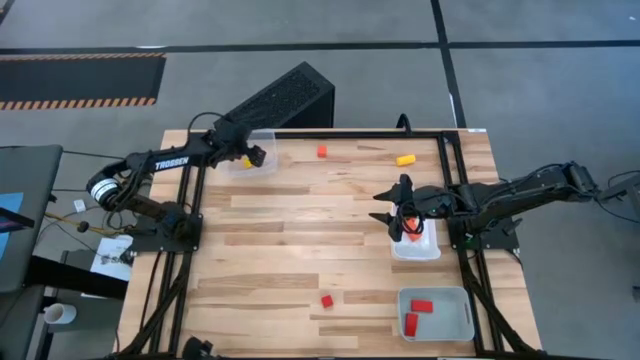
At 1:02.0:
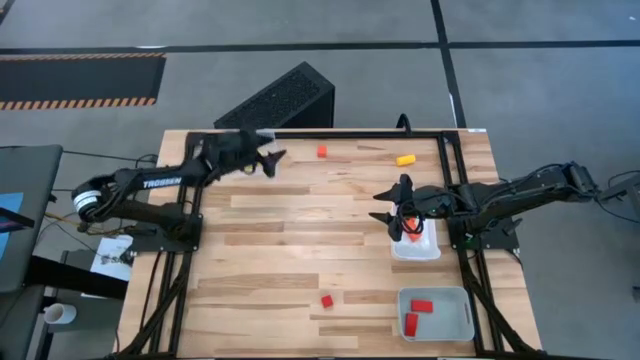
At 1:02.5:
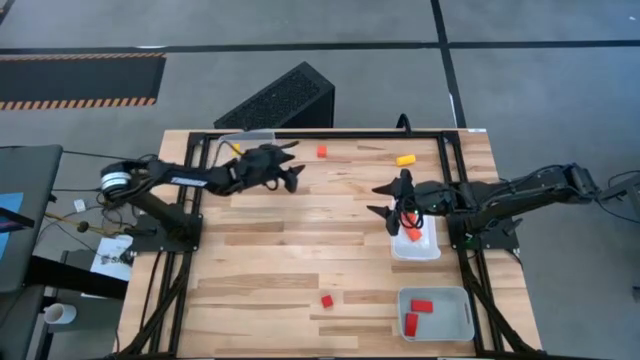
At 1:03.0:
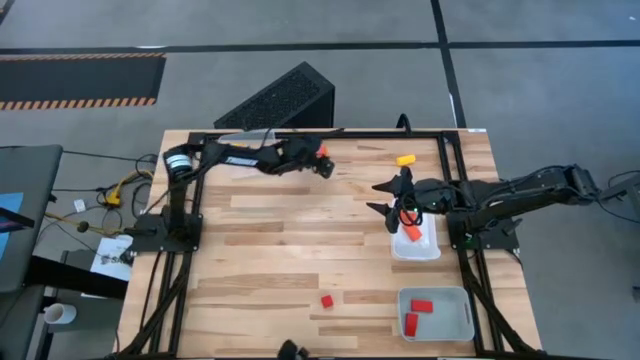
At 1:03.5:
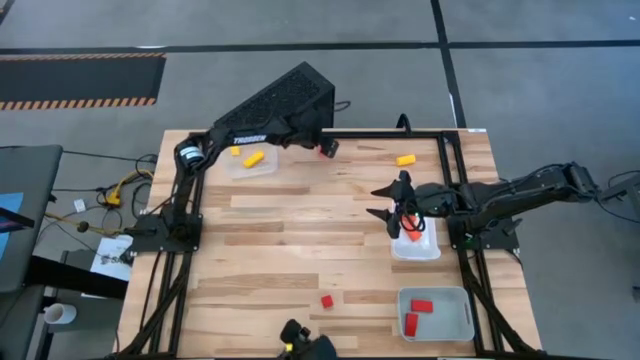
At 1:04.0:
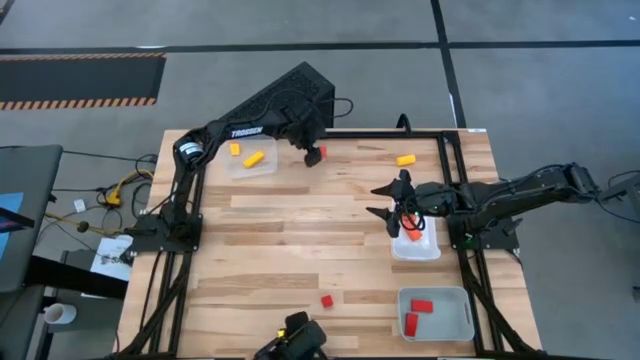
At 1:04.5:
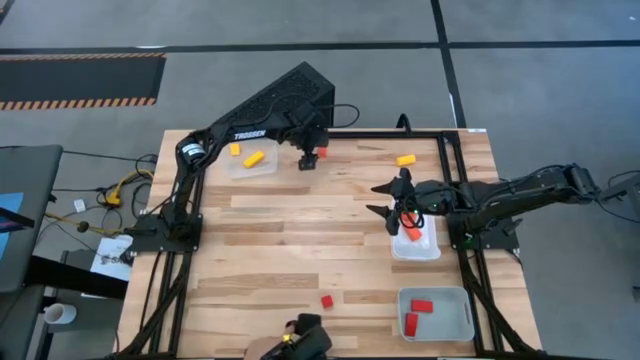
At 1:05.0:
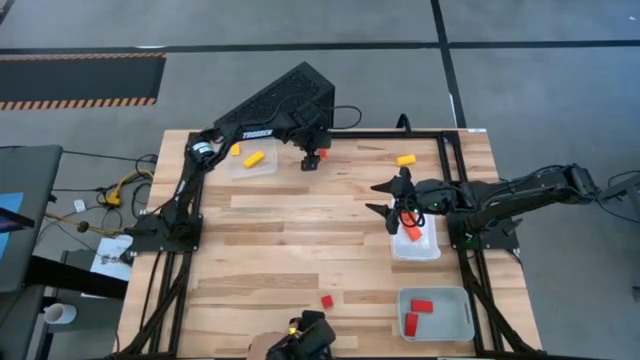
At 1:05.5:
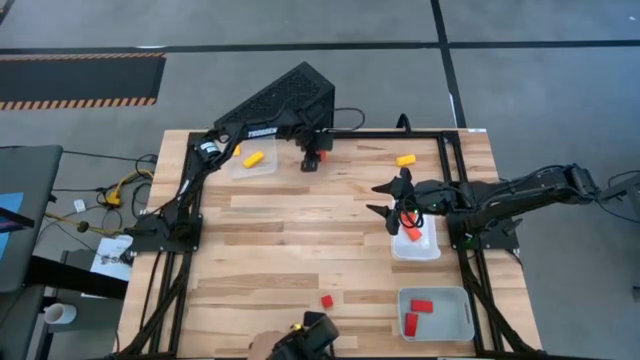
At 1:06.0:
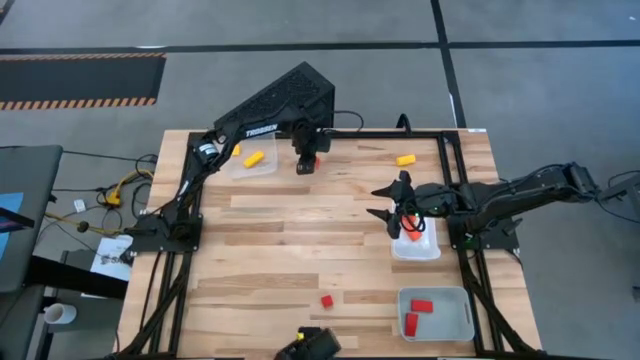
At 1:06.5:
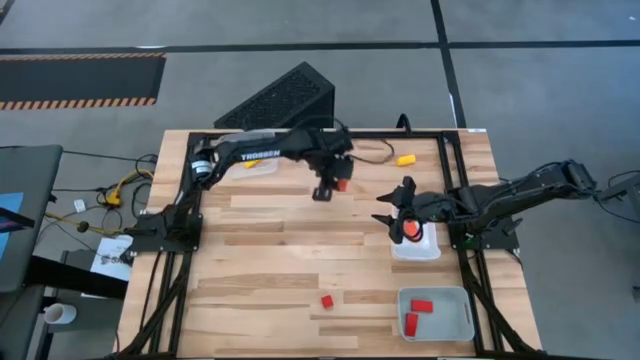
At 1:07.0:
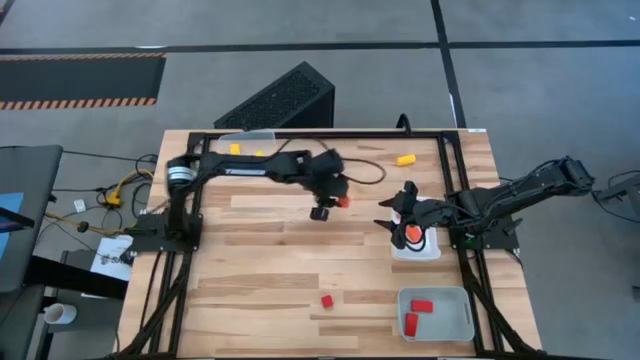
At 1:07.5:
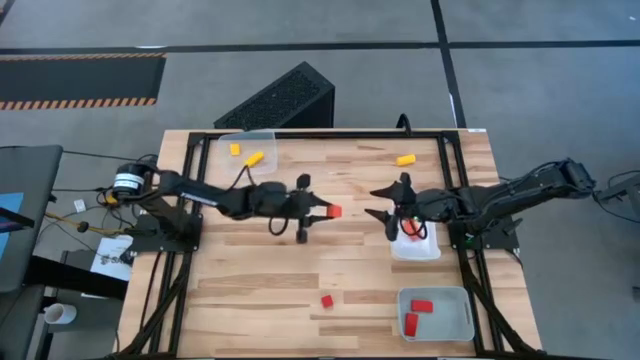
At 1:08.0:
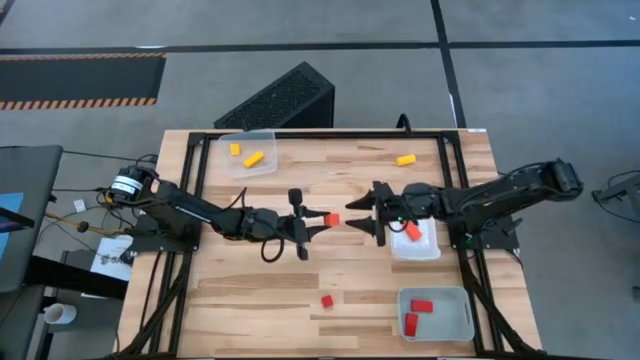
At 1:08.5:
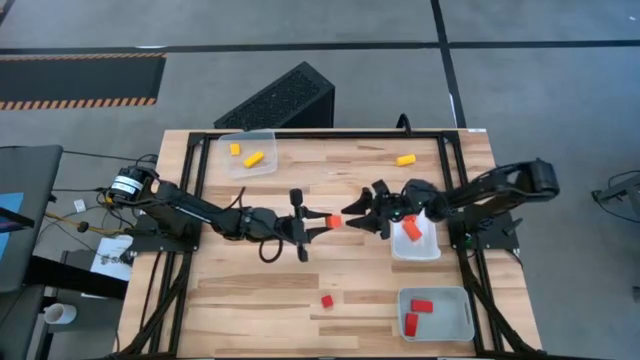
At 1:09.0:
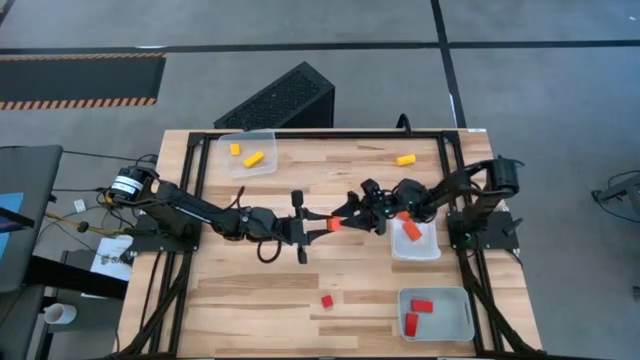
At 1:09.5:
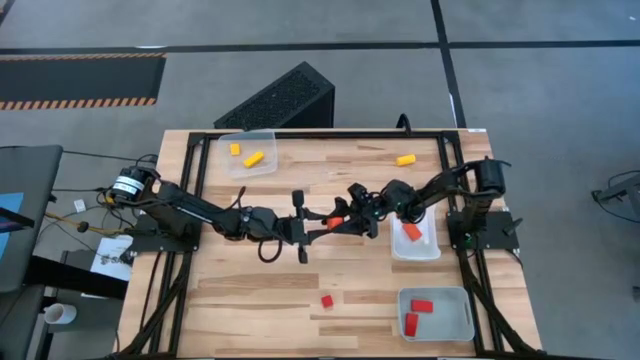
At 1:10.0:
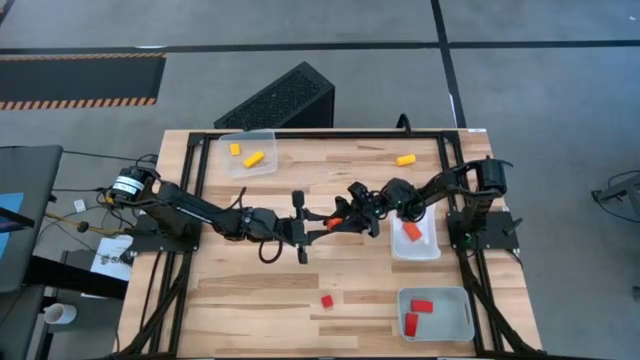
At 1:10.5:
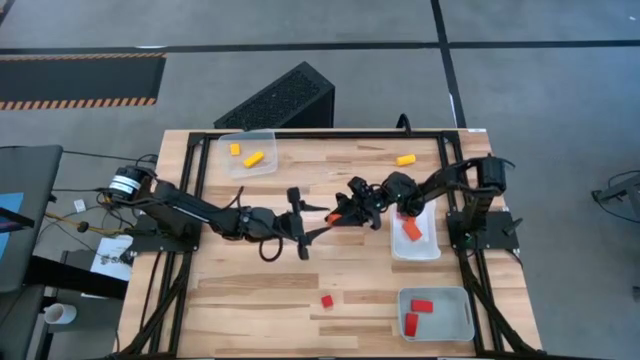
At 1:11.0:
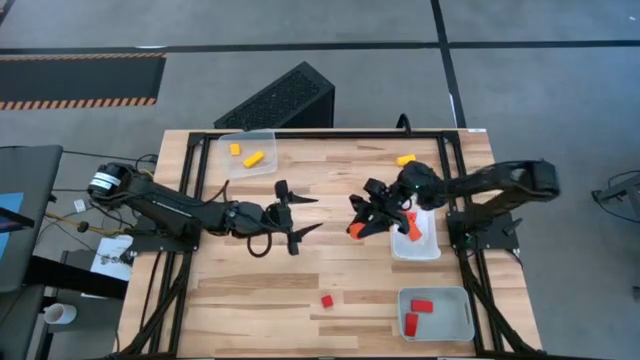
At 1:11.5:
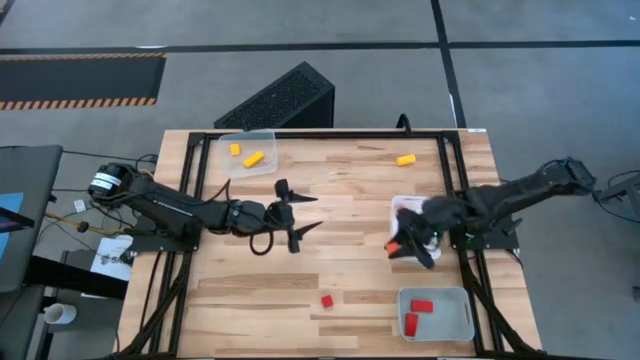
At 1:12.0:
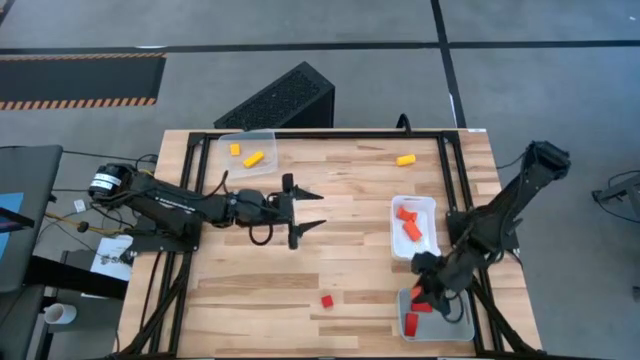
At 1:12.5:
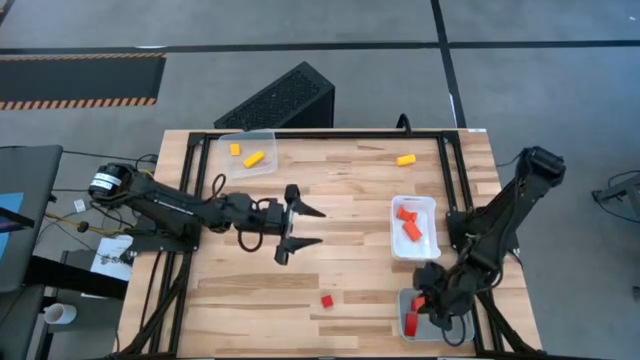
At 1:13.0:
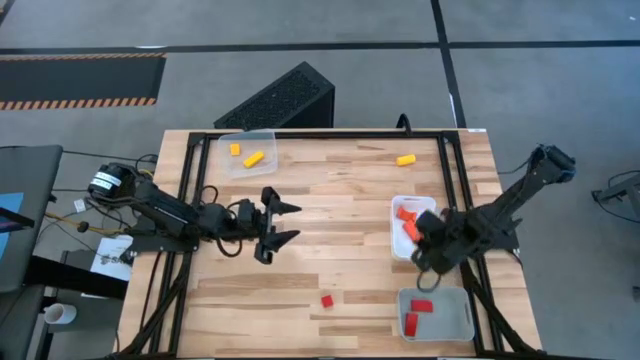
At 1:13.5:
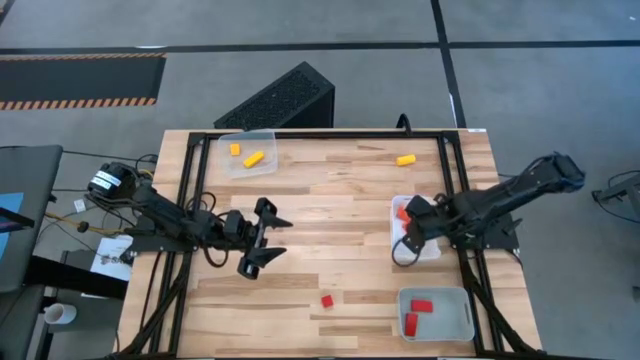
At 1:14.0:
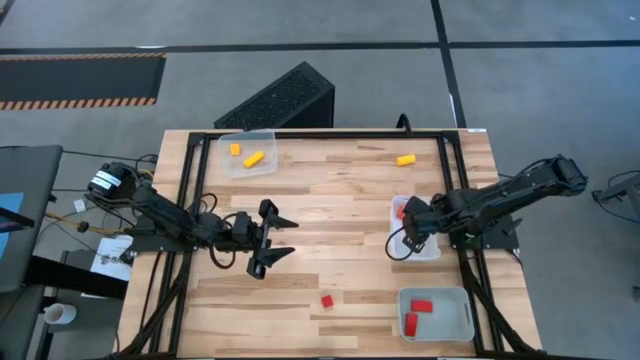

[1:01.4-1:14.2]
Task: Sort & place blocks by color
Put the orange block into the white bin

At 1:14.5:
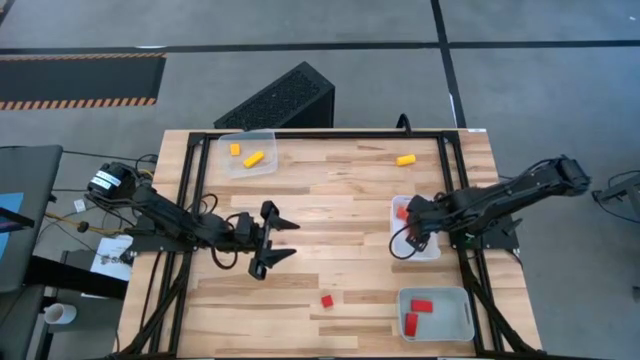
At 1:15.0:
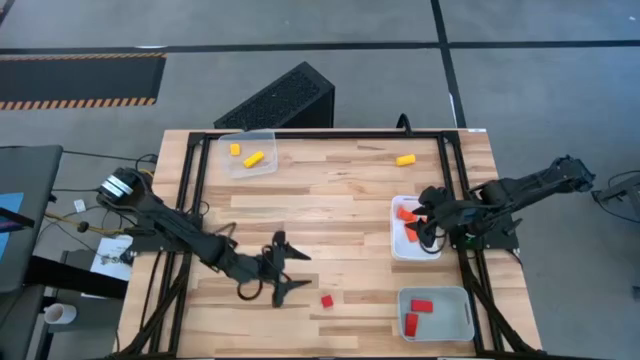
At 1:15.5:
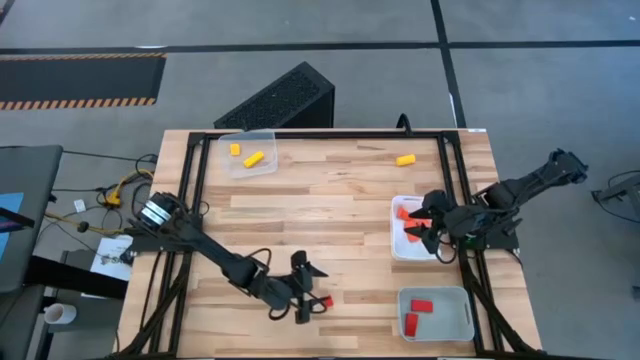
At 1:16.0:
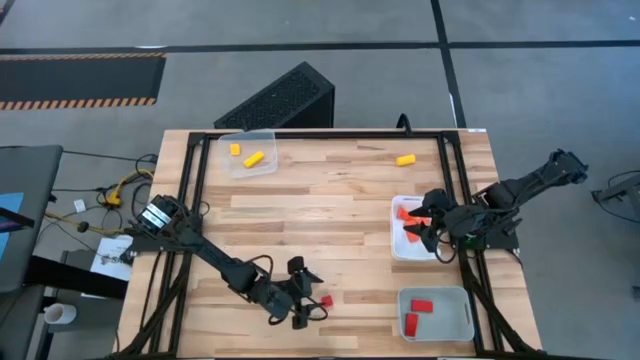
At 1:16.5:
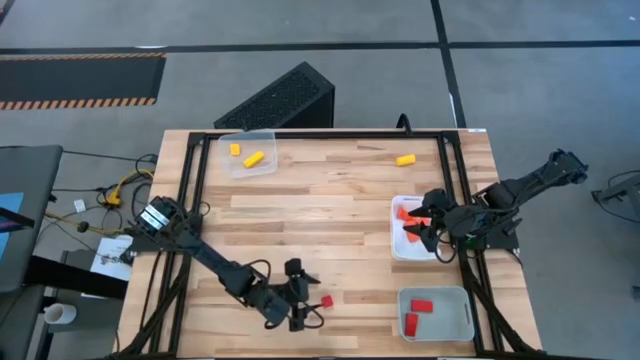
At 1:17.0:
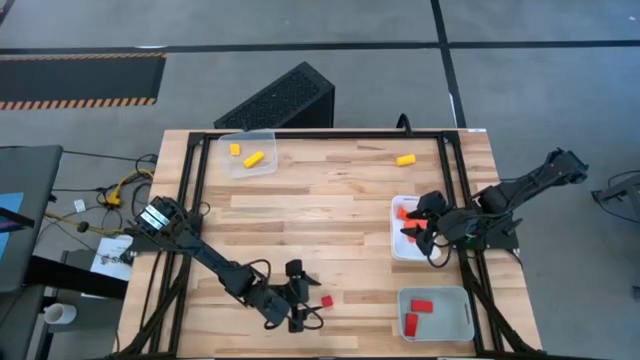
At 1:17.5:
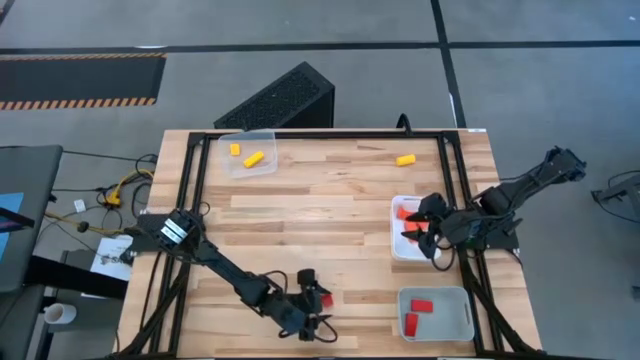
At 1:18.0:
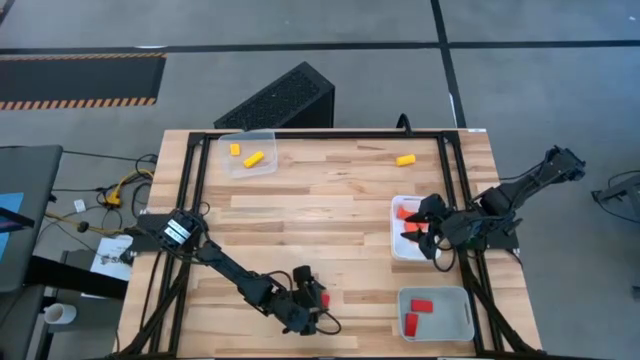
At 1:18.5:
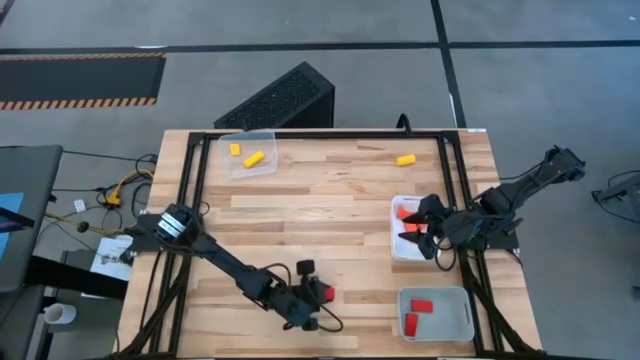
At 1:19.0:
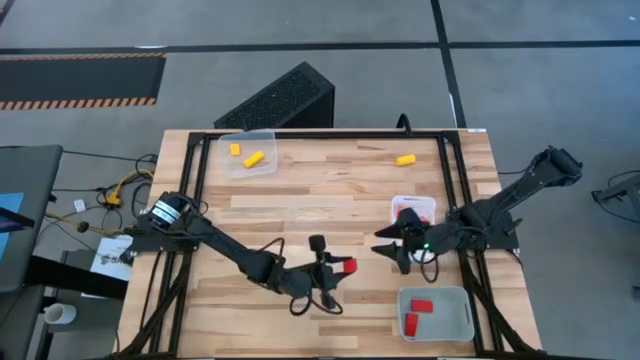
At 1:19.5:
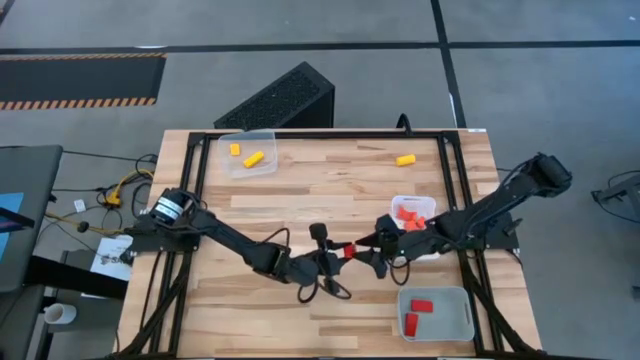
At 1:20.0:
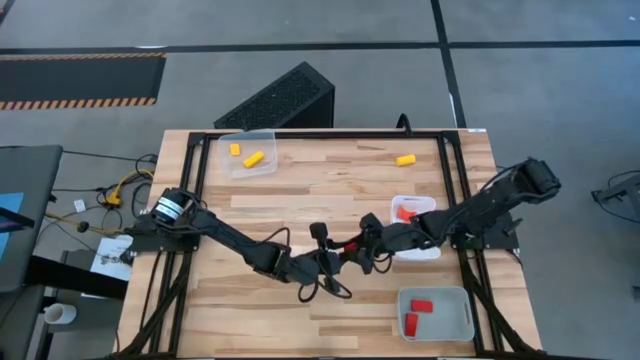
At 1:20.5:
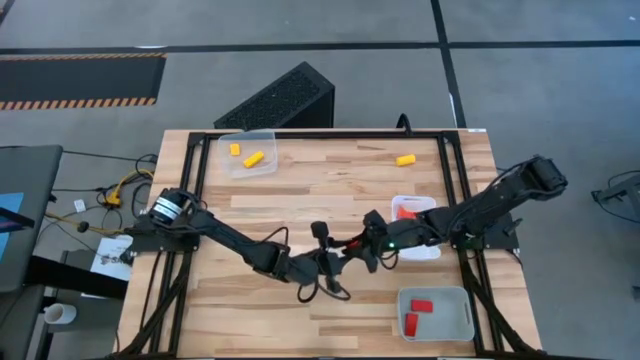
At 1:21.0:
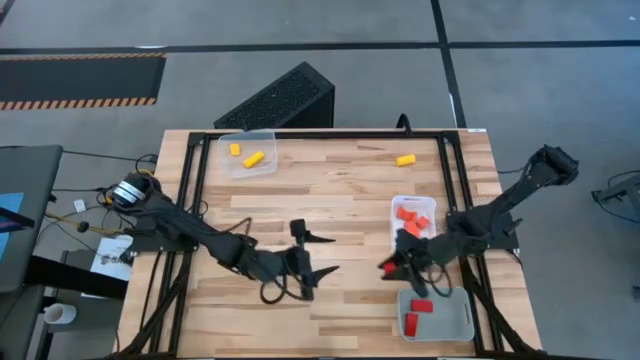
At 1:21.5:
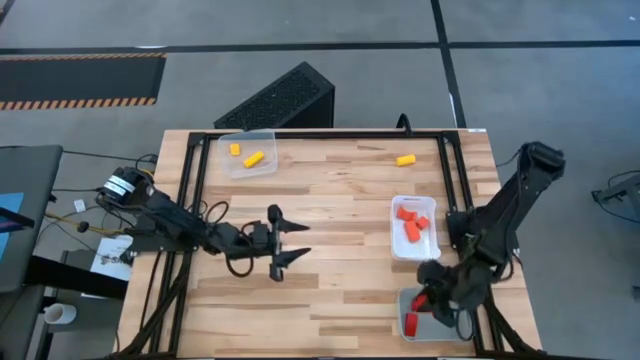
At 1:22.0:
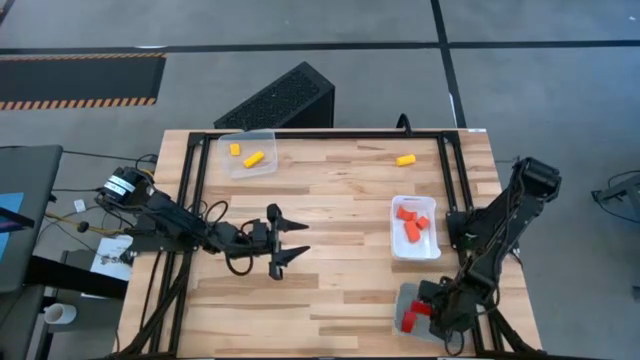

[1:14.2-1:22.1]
Put the red block into the gray bin

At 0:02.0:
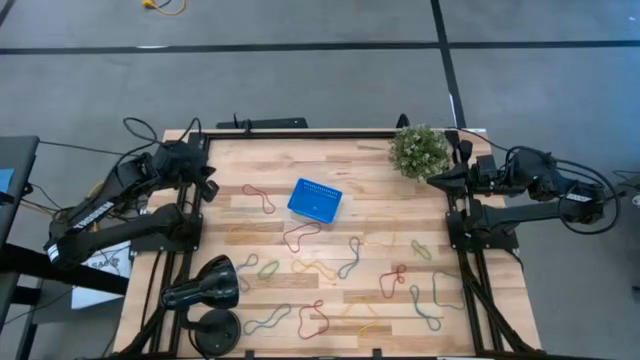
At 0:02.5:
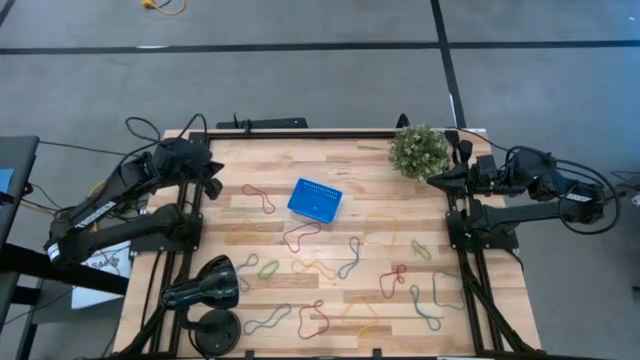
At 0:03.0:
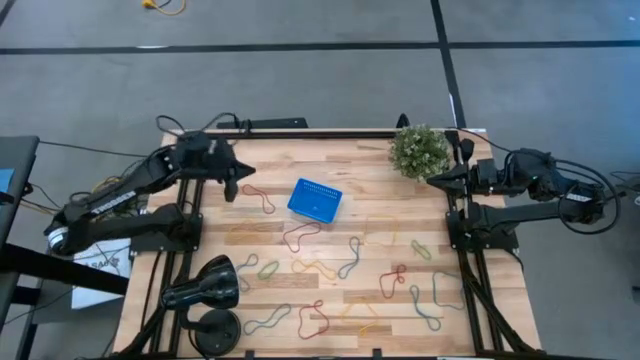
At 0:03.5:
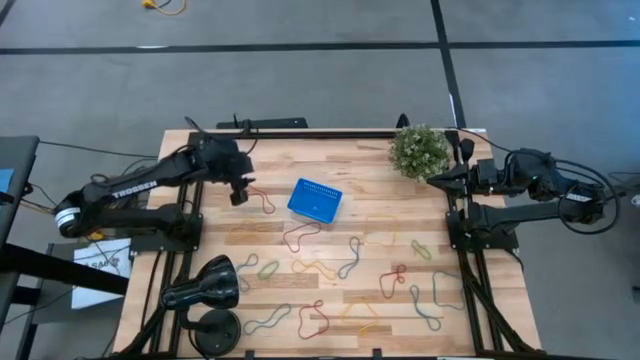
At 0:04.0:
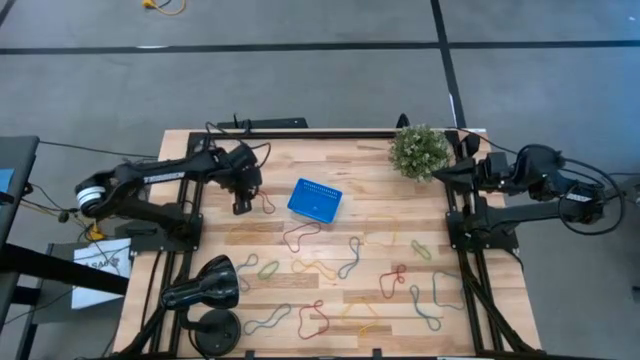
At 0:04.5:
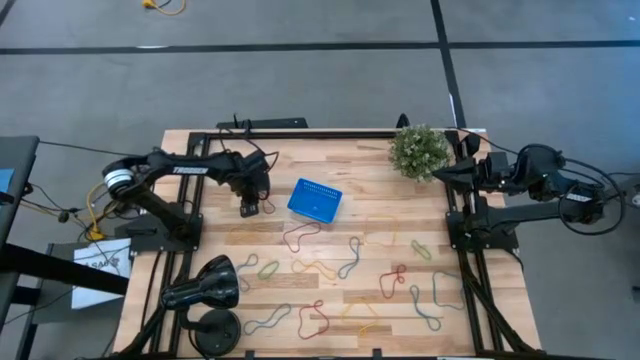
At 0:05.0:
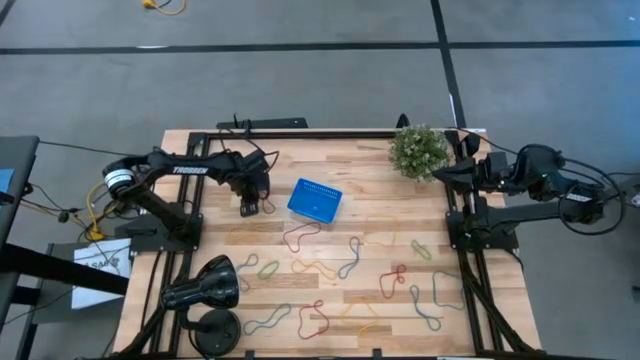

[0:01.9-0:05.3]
Task: Pick and place items into bin
Put the red rubber band into the blue bin
